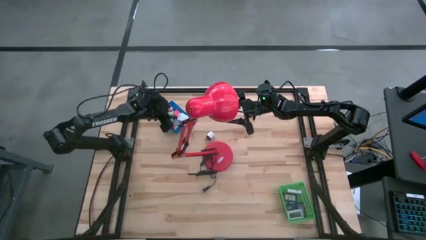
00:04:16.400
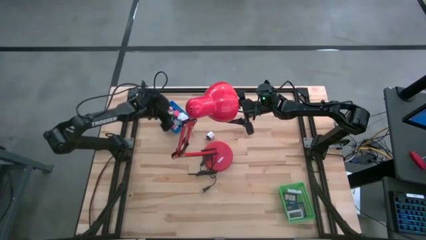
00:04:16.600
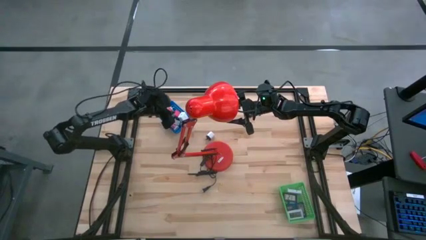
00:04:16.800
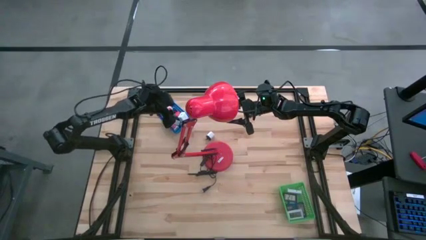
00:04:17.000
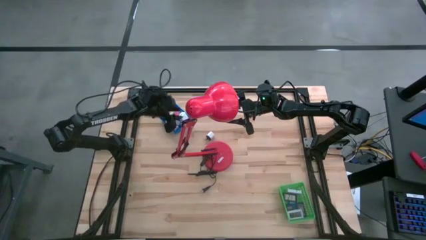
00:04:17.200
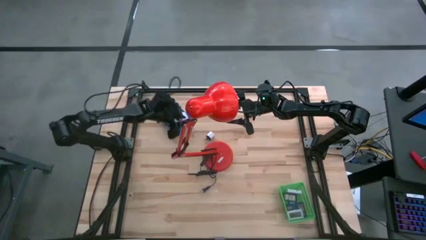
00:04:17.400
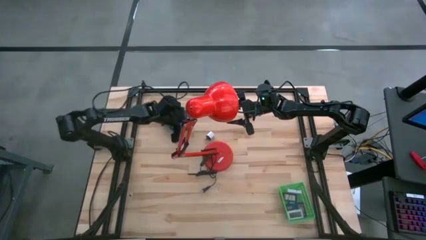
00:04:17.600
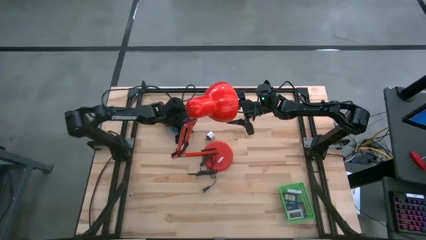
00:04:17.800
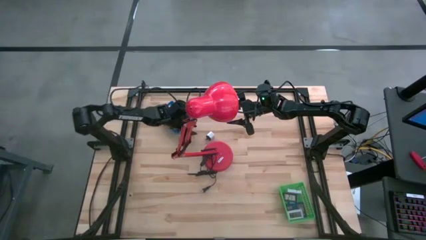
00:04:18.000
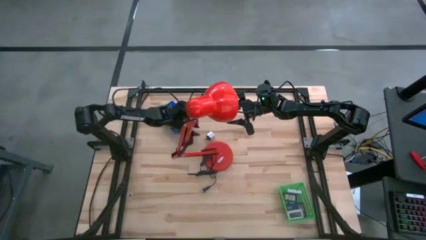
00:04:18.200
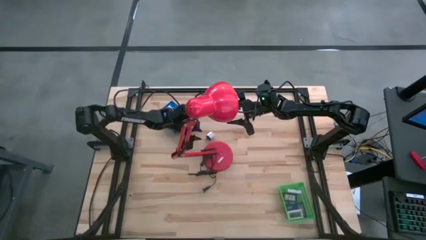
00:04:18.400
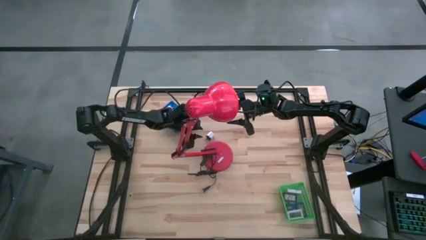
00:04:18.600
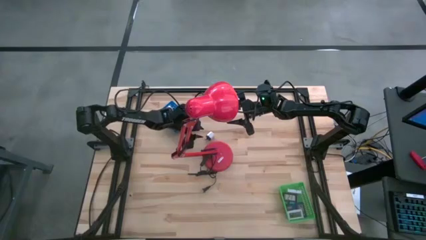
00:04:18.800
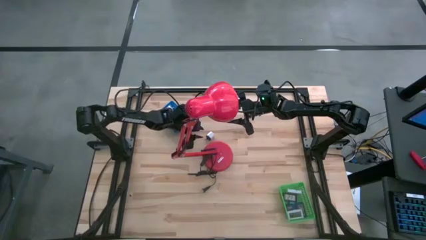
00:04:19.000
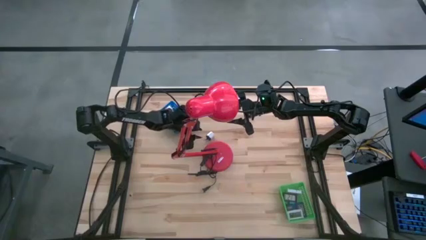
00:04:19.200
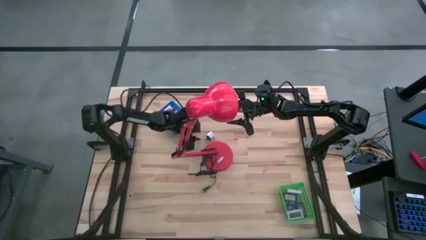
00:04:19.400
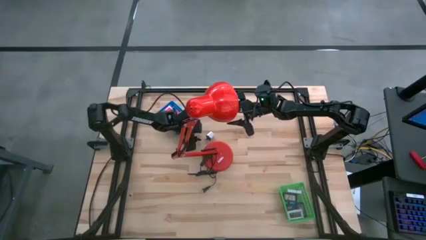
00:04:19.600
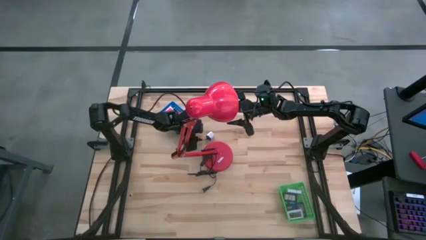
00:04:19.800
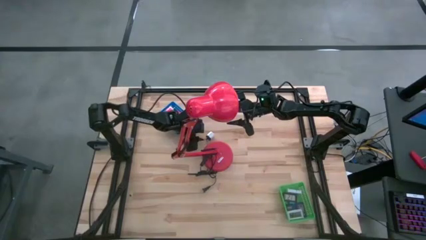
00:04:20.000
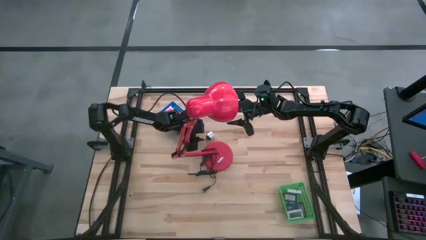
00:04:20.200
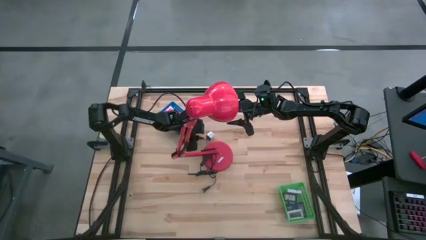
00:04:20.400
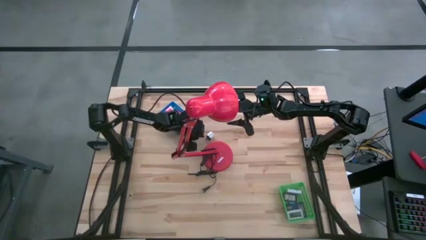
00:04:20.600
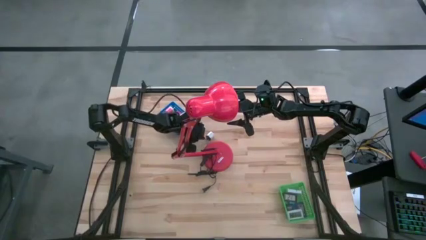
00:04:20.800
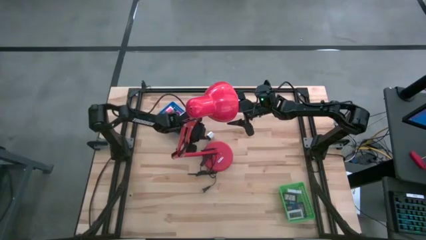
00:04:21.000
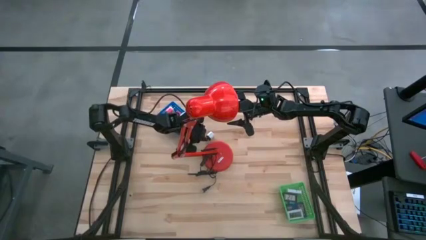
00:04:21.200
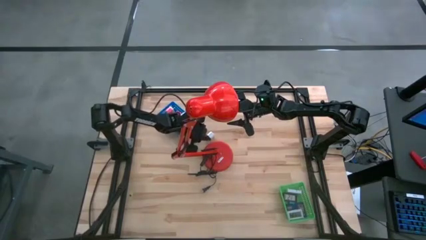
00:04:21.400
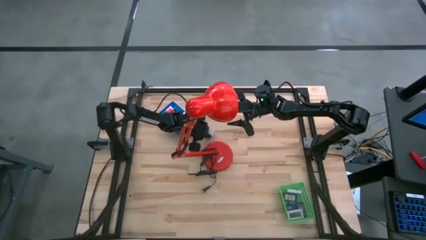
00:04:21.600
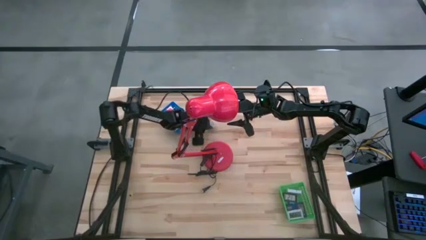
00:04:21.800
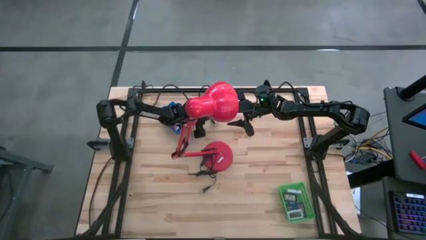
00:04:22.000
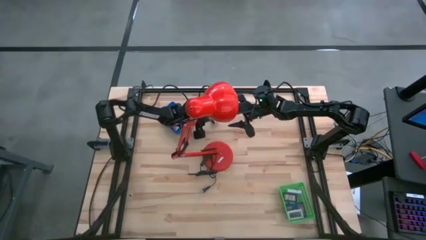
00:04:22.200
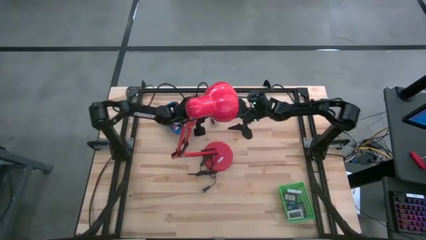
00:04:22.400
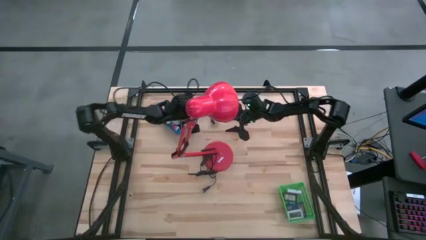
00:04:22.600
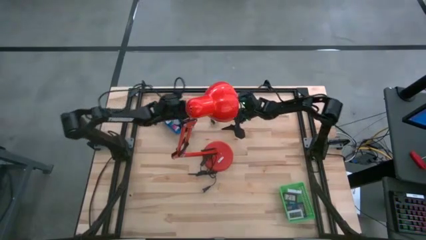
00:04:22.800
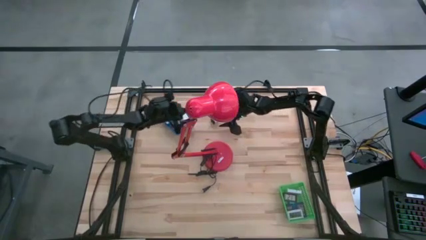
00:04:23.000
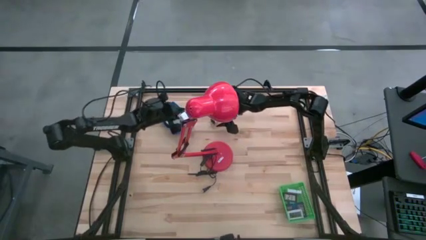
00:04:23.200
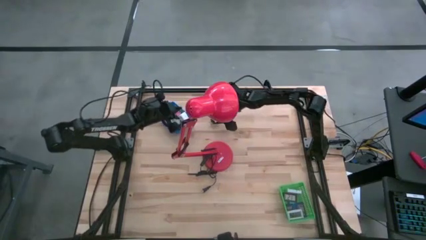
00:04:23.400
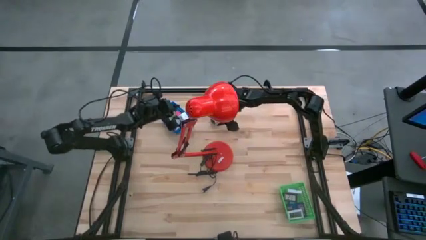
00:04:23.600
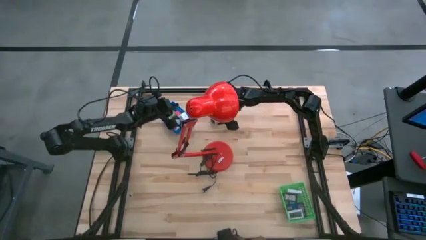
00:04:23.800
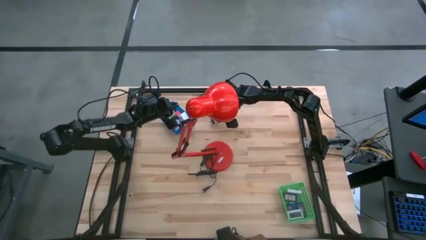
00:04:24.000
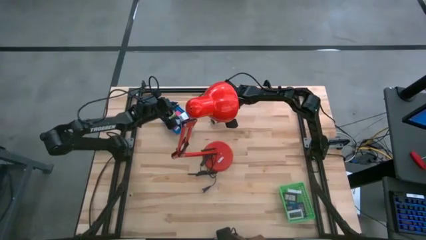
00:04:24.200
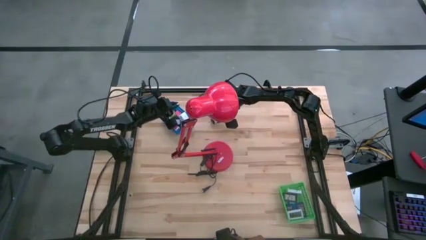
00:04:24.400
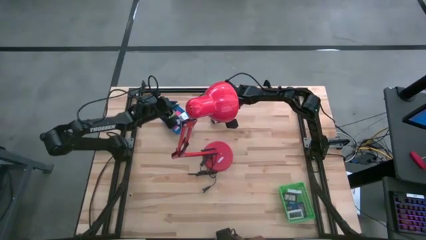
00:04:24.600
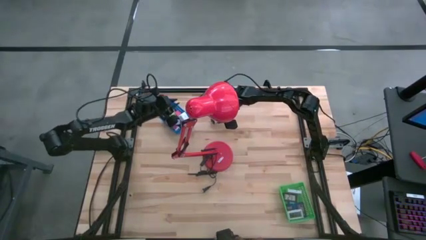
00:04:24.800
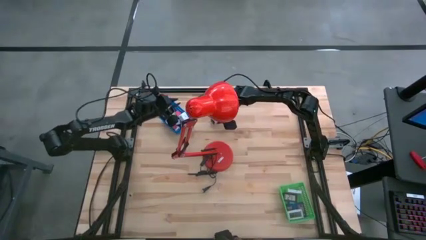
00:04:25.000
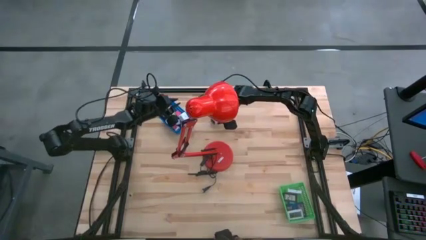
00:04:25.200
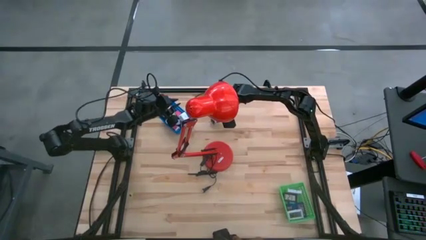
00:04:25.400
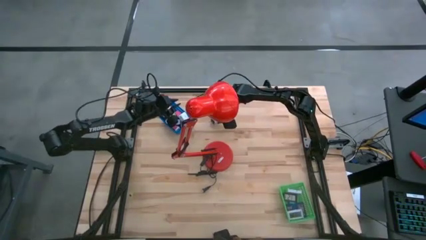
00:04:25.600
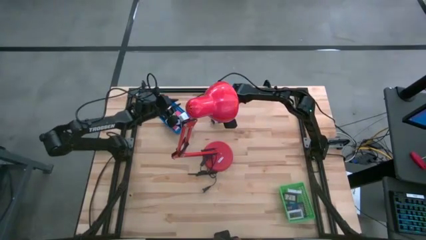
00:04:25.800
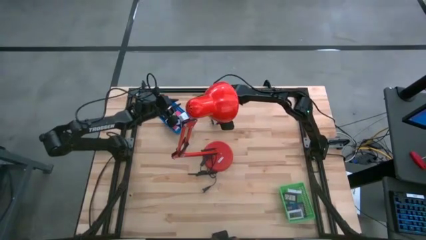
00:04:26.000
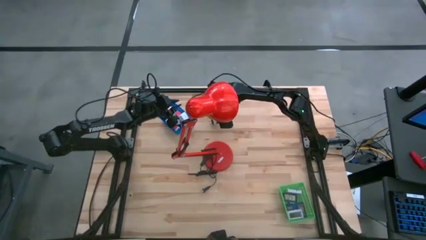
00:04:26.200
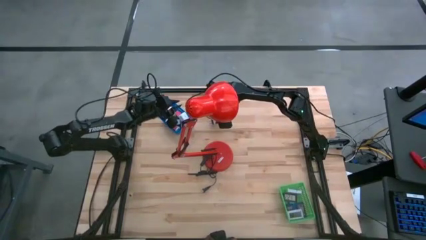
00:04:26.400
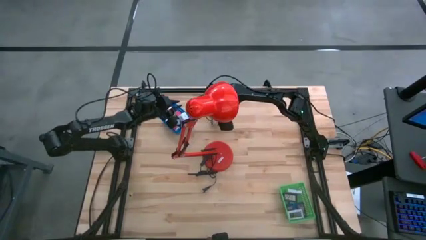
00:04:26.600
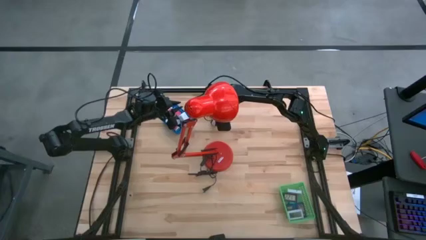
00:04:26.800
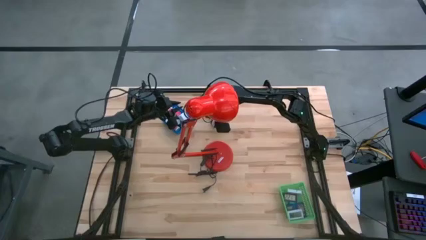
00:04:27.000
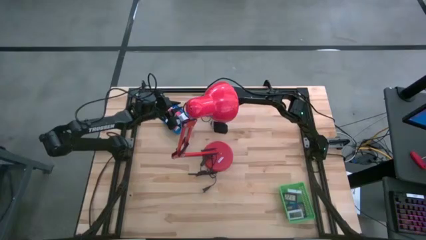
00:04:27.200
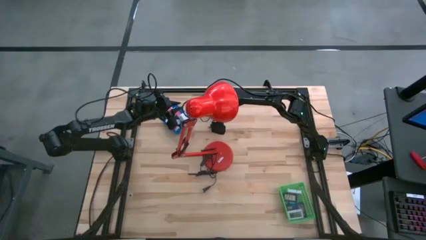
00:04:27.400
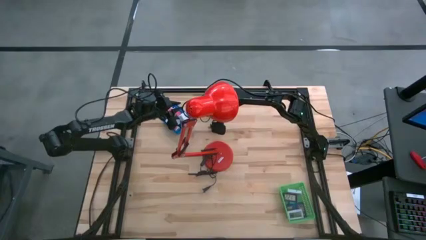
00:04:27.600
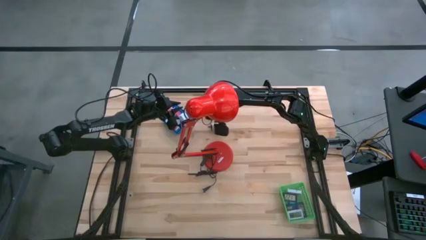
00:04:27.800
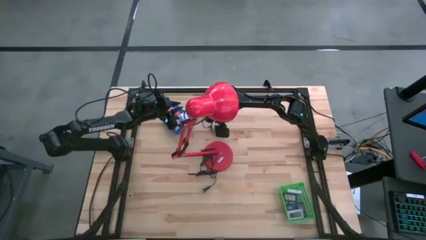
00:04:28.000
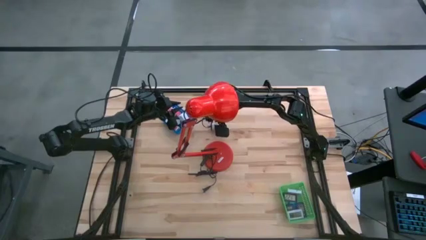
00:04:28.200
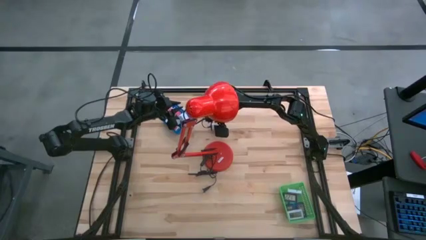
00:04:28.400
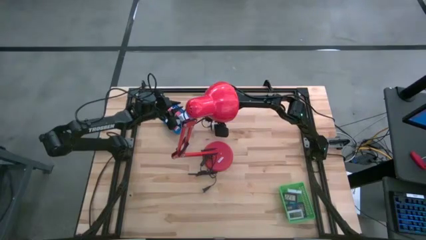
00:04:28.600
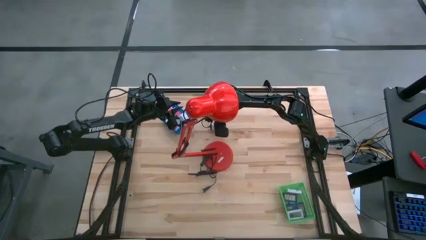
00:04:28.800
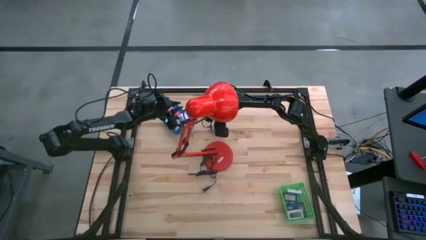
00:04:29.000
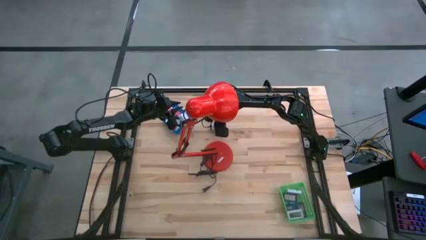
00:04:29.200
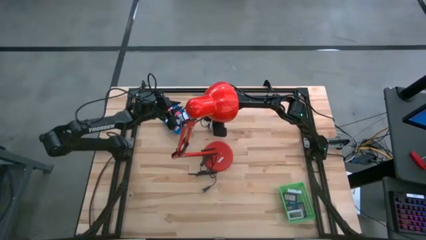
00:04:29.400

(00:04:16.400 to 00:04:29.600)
Task: Pick & Place Office items
Put the white black charger adapter into the blue bin
